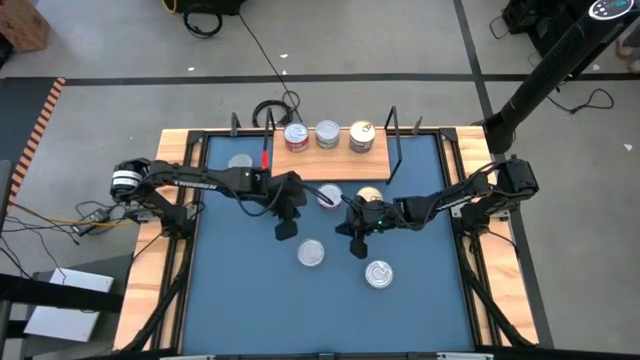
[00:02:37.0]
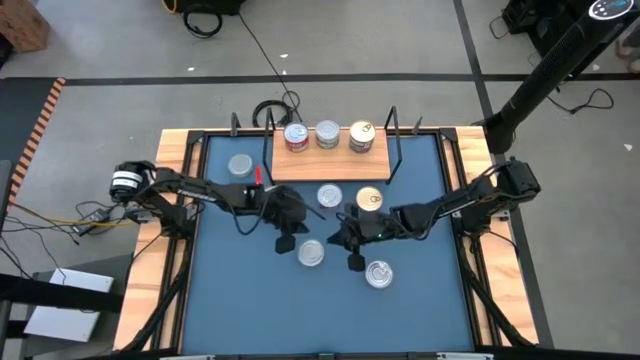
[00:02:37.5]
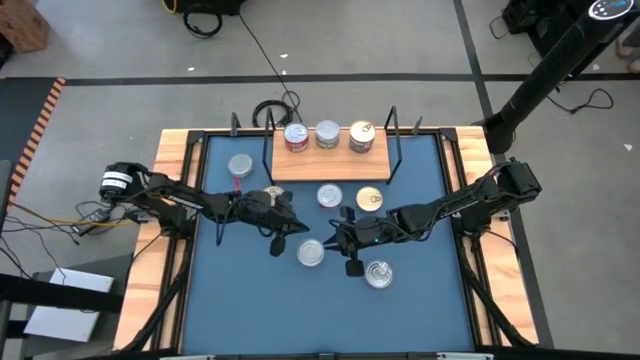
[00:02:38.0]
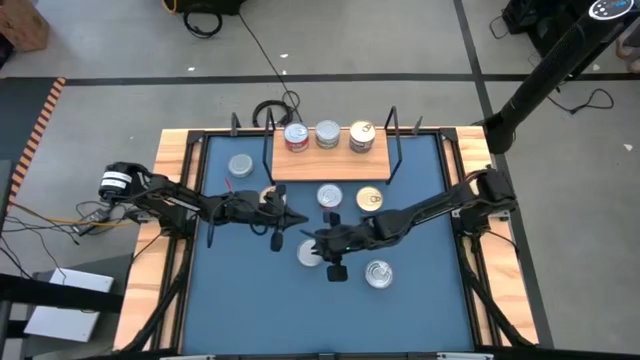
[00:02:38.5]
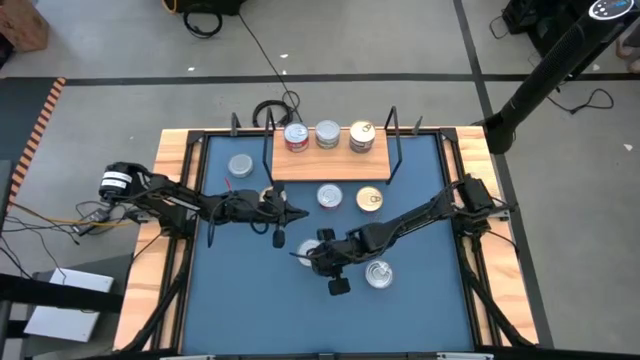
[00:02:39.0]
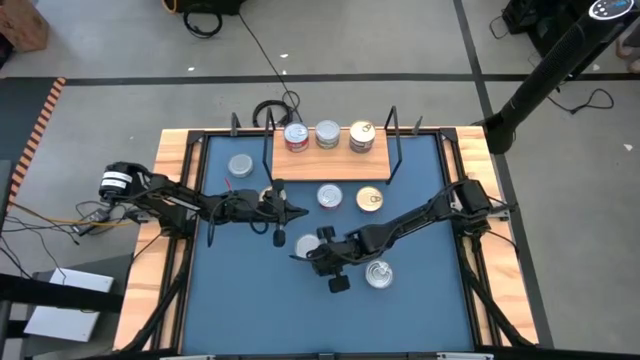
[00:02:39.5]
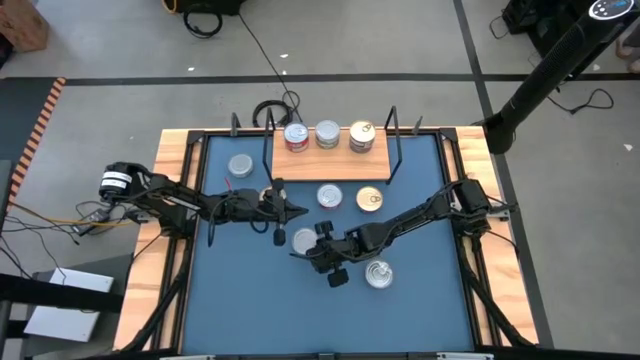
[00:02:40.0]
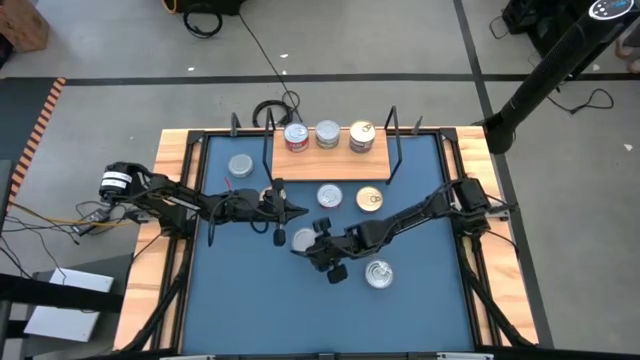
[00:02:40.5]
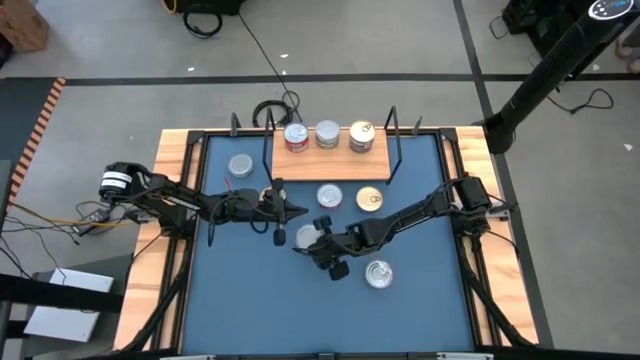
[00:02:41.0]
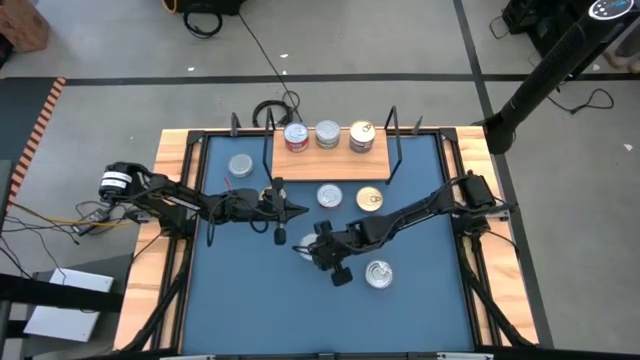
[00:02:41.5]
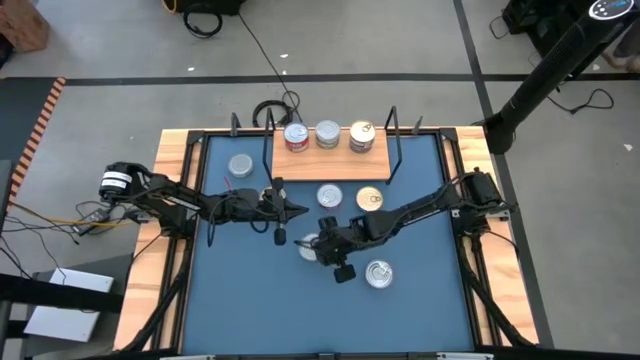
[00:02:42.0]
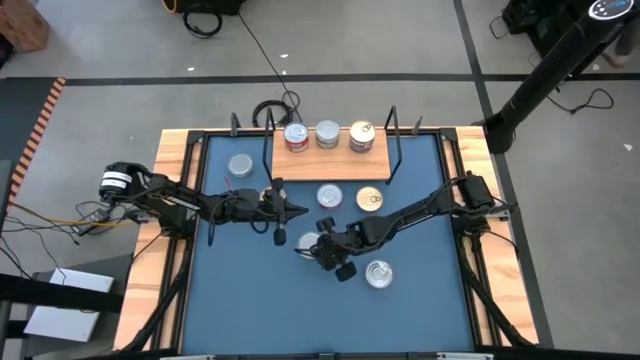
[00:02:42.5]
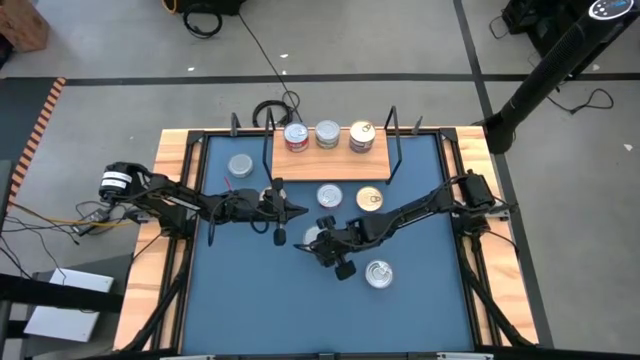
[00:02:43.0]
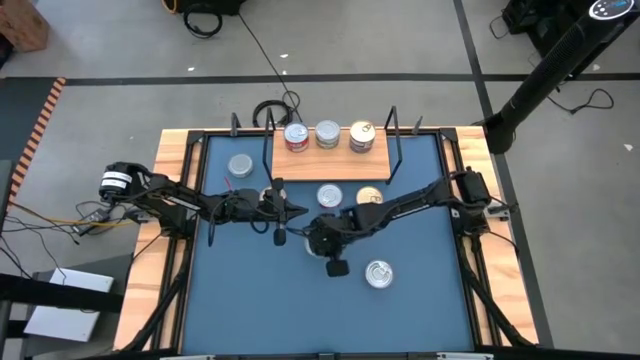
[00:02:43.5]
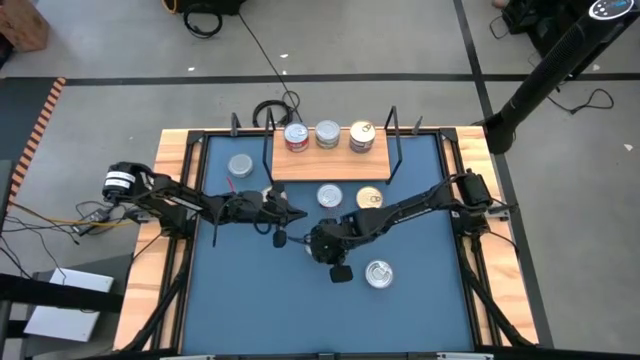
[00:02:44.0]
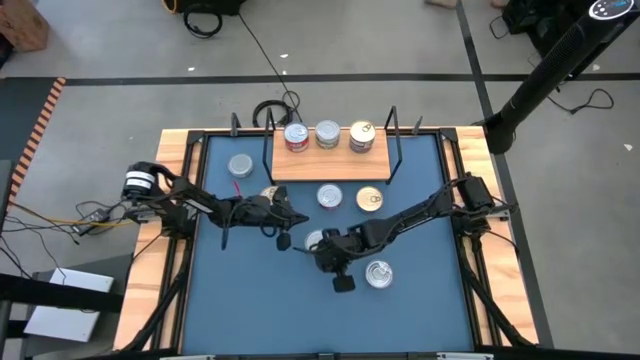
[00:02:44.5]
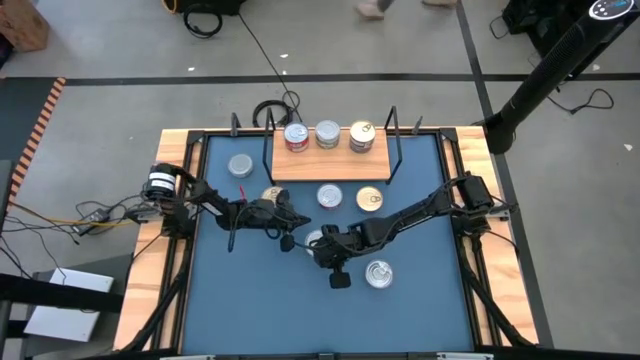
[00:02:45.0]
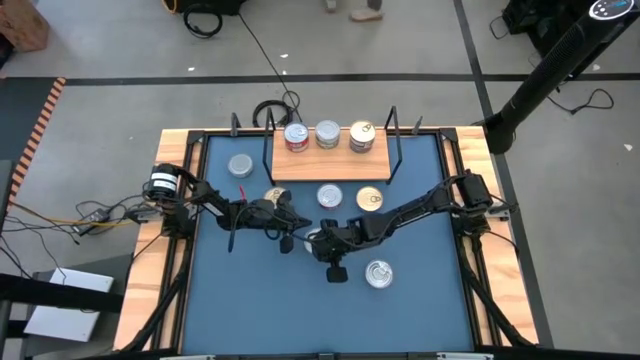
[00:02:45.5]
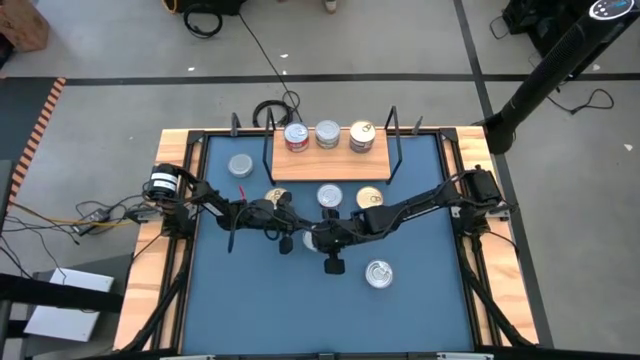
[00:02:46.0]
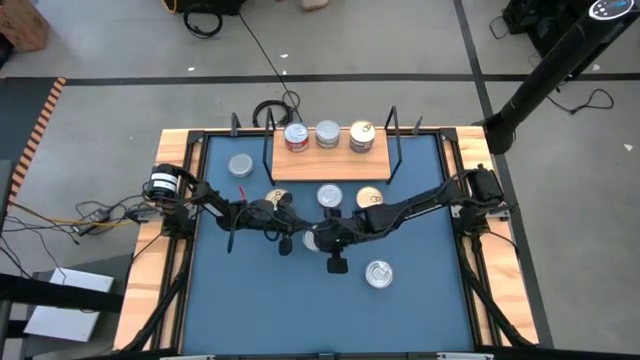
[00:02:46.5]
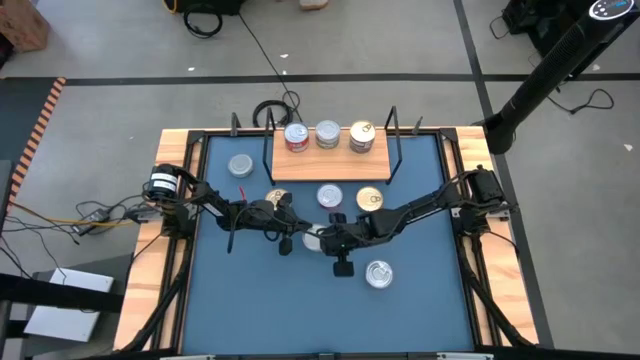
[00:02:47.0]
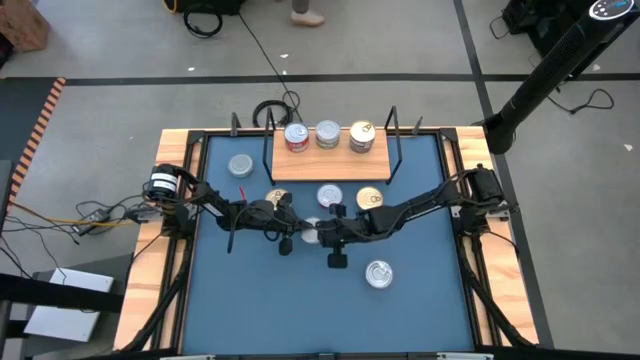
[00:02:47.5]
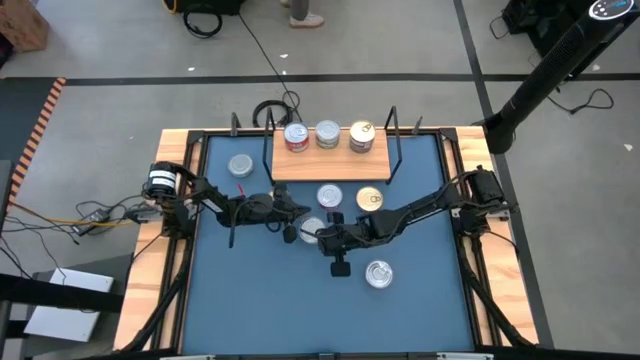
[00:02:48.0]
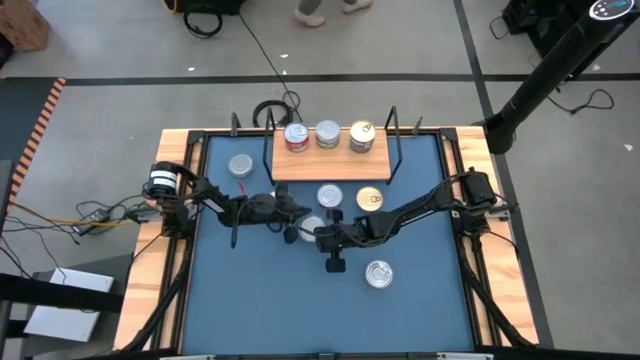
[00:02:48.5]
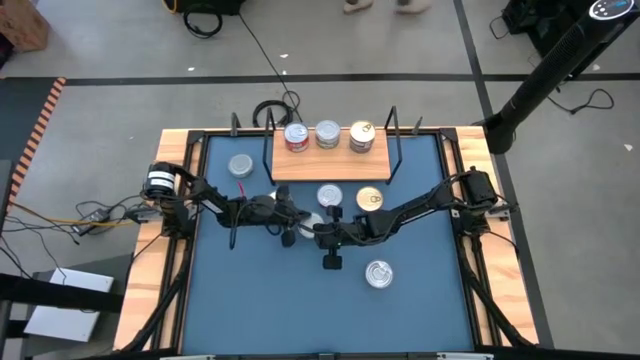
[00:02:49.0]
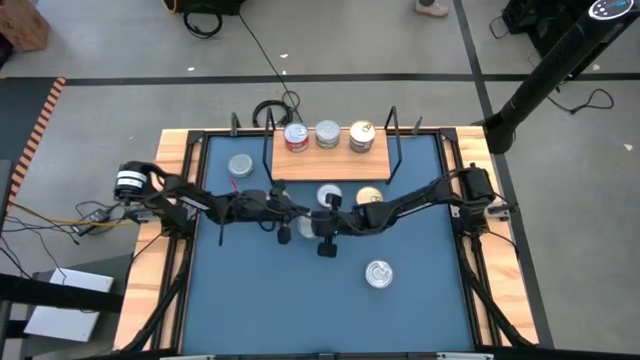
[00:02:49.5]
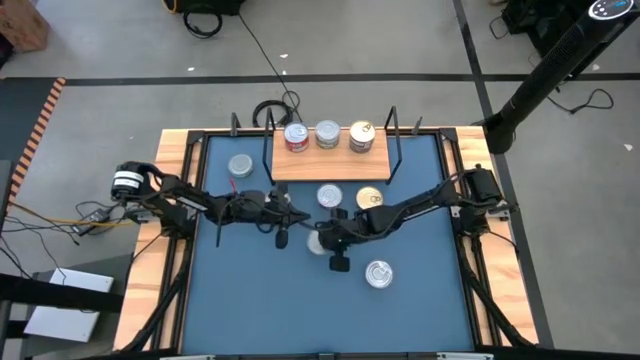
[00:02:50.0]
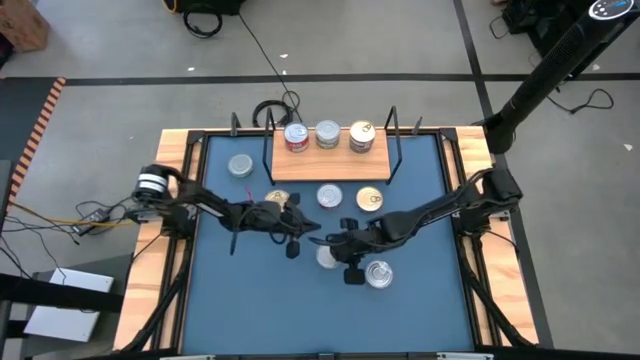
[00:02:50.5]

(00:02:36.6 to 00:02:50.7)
Task: Stack canned seafood by type on shelf
Put the green tuna can aligned with the stacked green tuna can on the shelf
